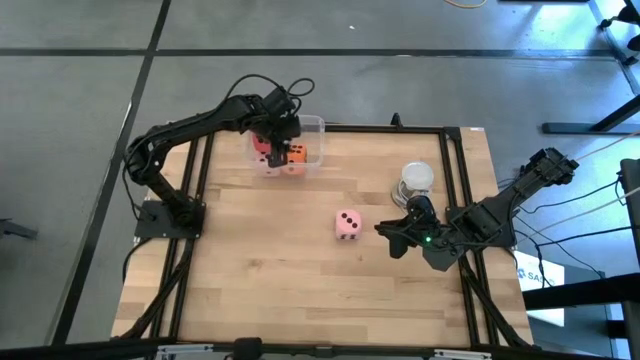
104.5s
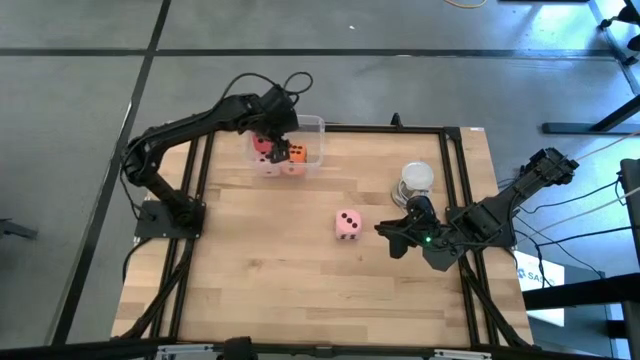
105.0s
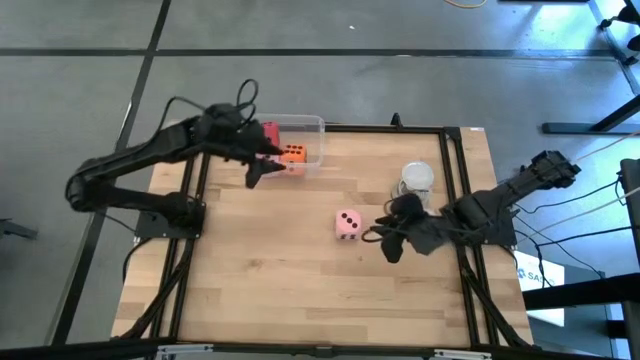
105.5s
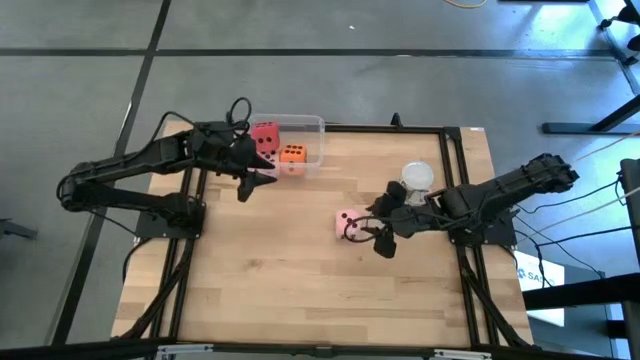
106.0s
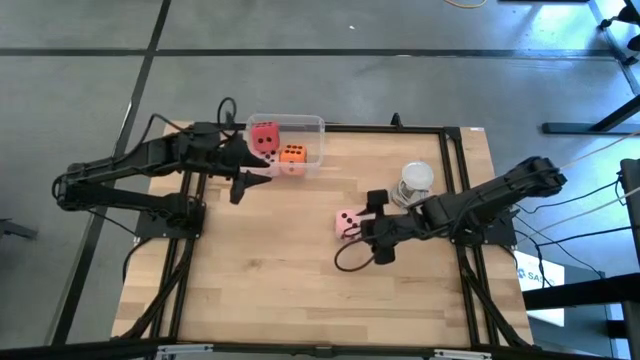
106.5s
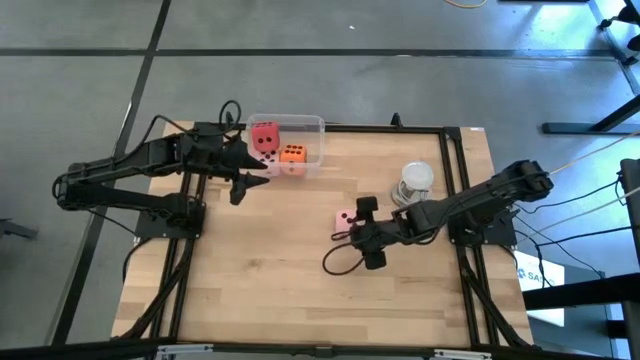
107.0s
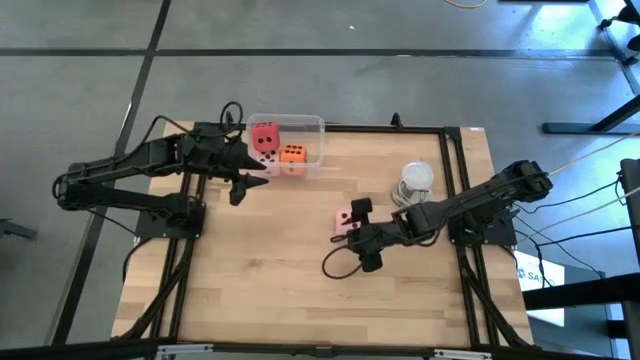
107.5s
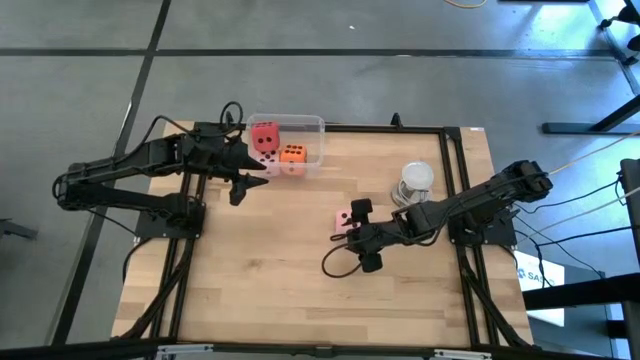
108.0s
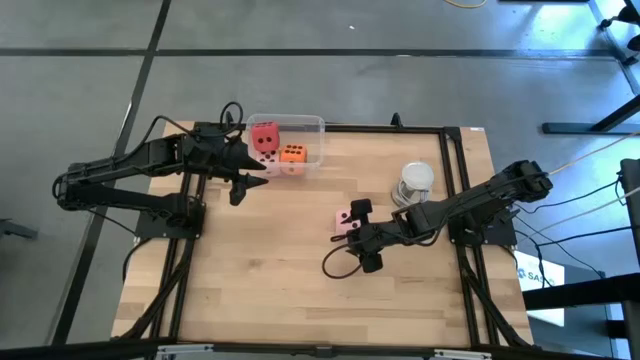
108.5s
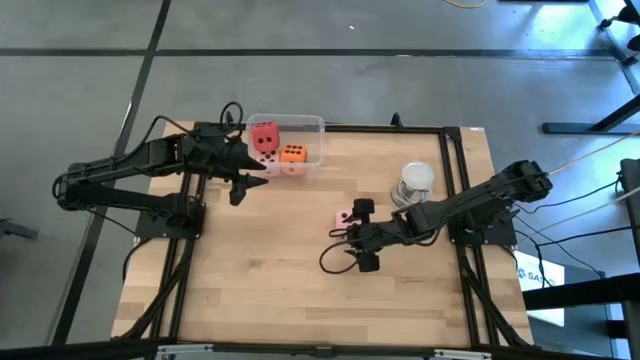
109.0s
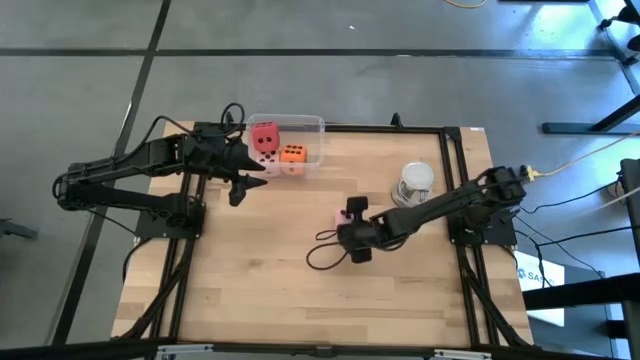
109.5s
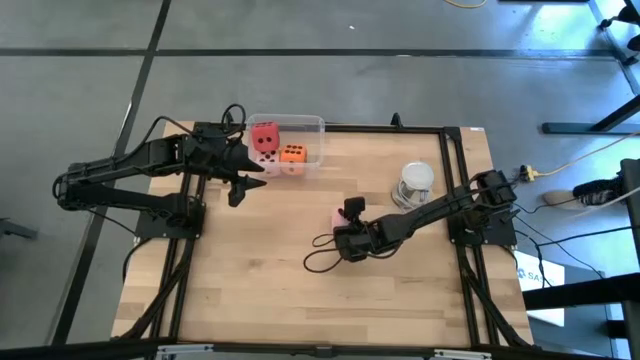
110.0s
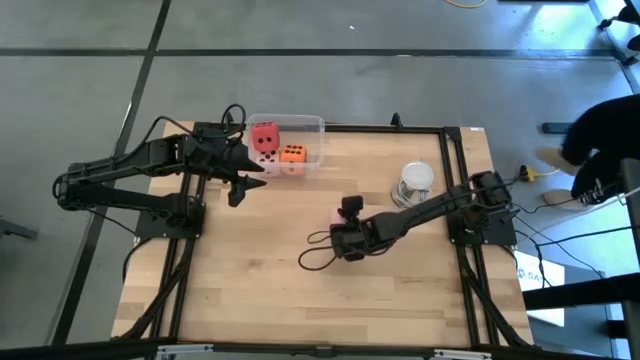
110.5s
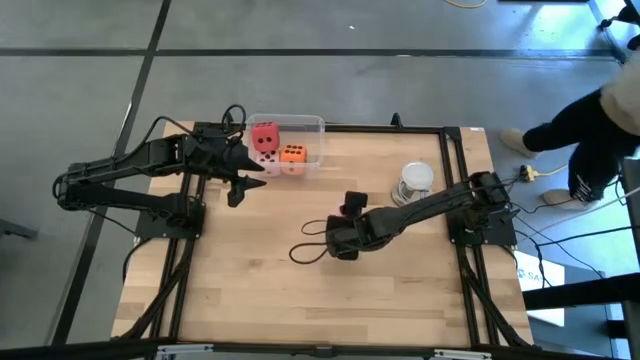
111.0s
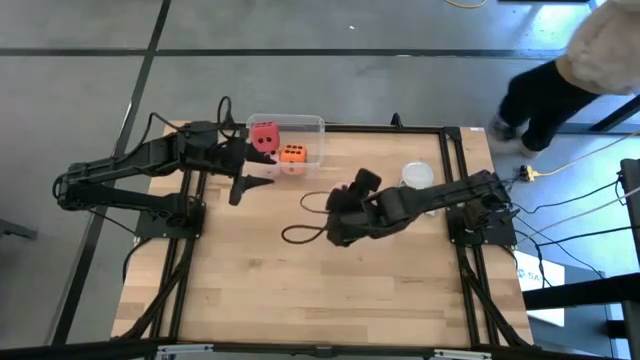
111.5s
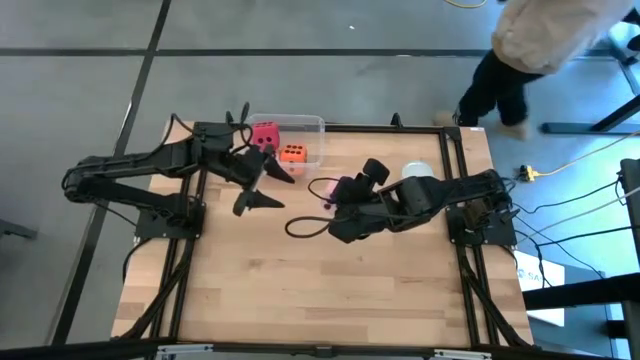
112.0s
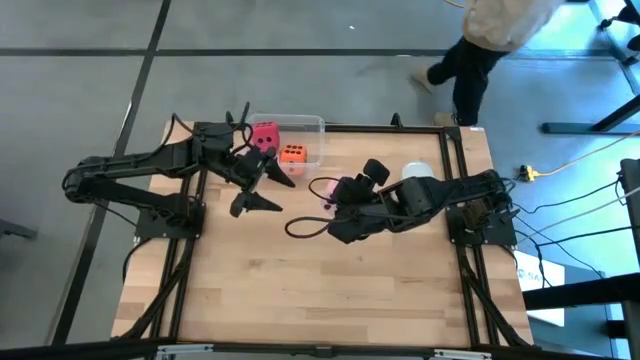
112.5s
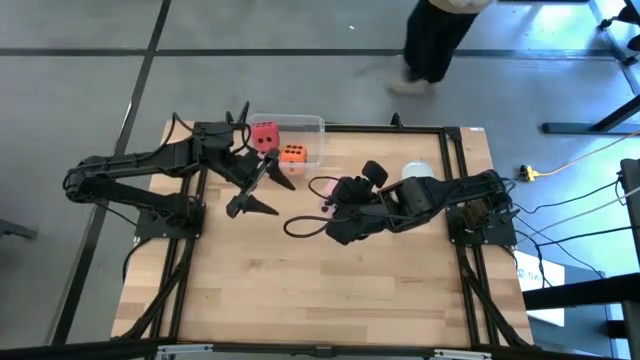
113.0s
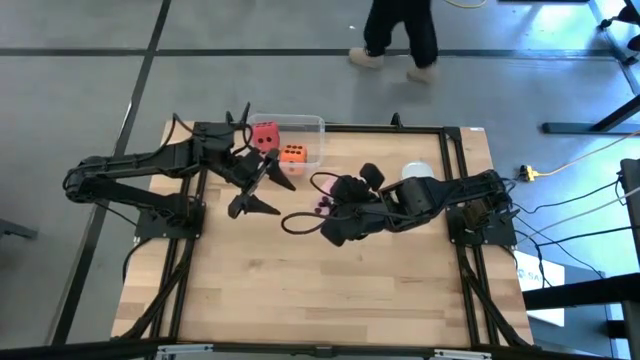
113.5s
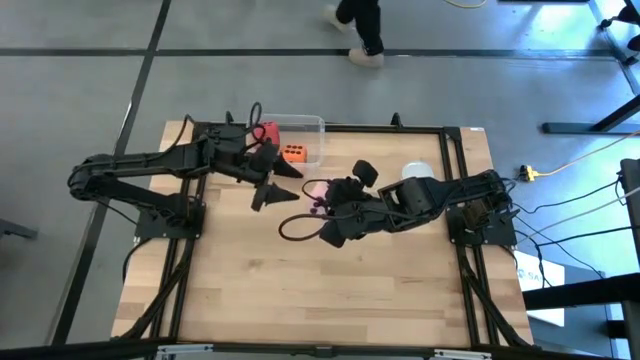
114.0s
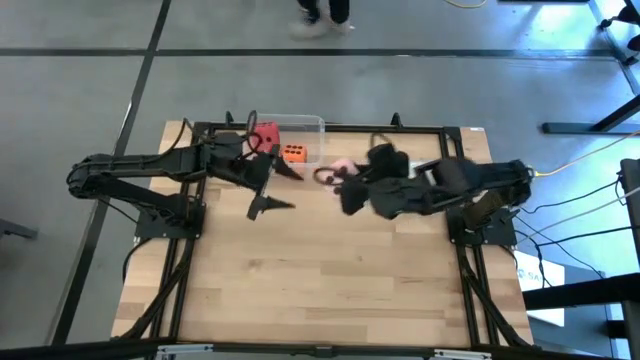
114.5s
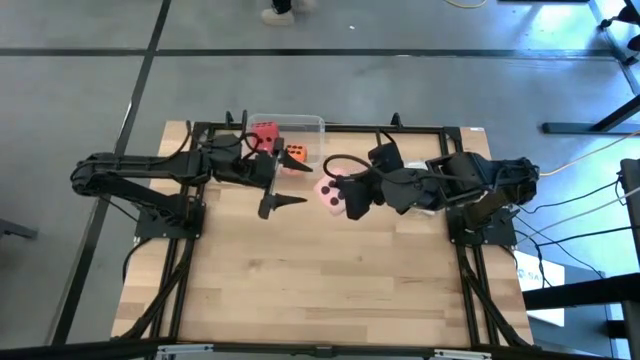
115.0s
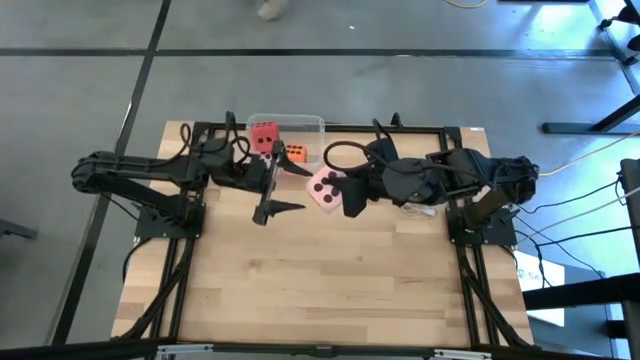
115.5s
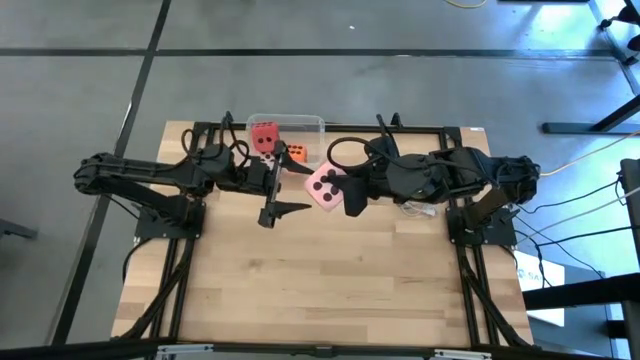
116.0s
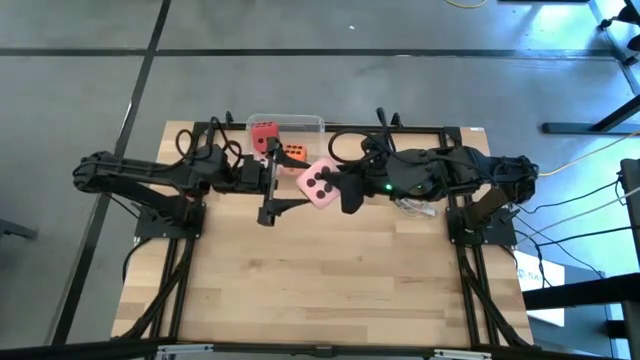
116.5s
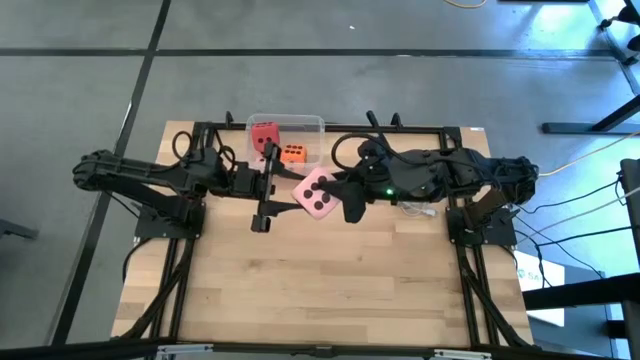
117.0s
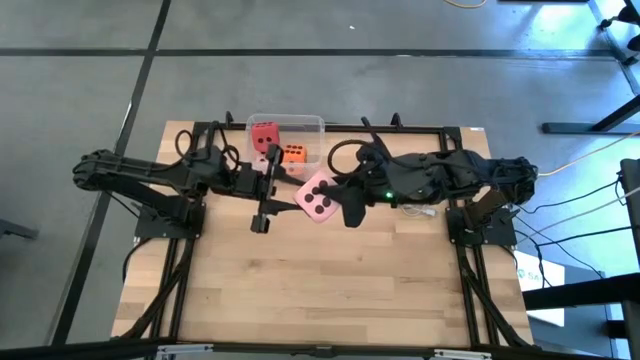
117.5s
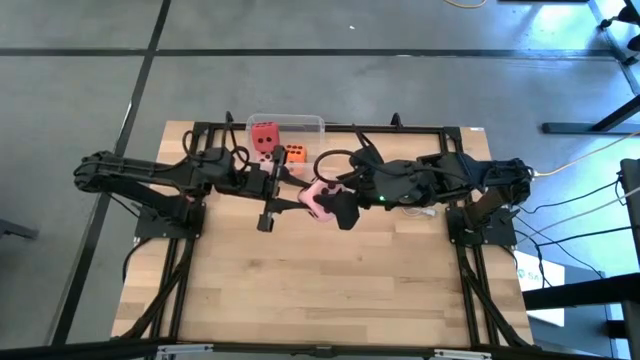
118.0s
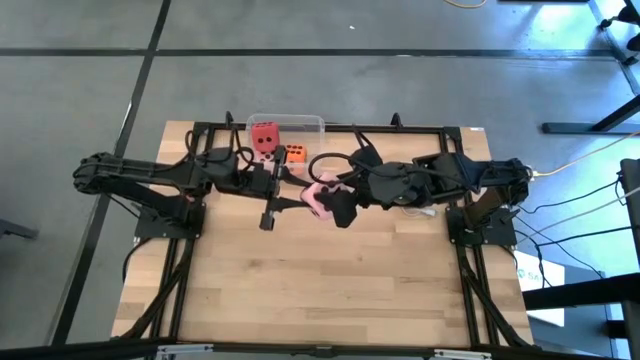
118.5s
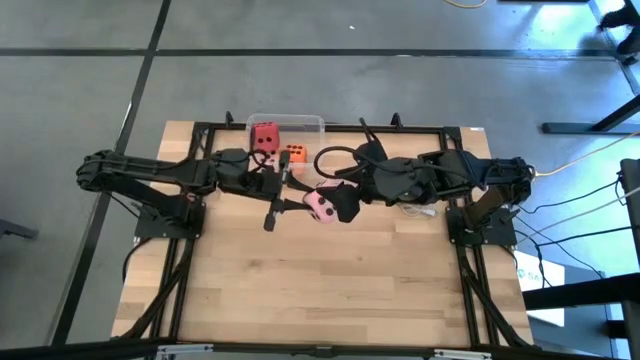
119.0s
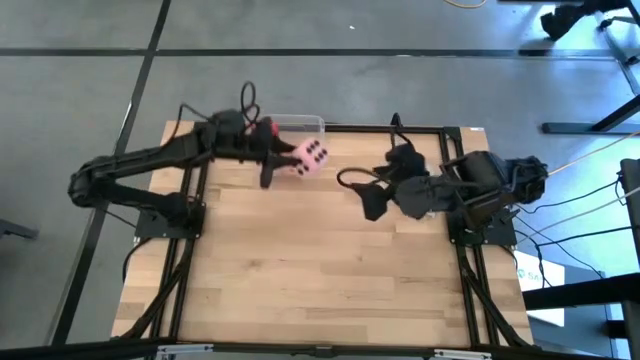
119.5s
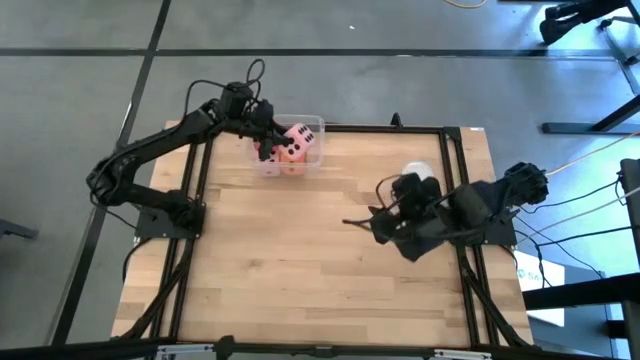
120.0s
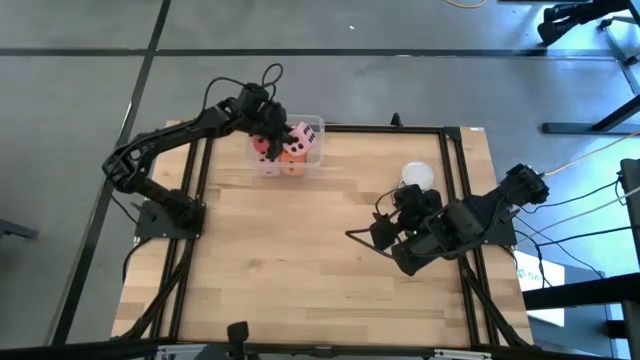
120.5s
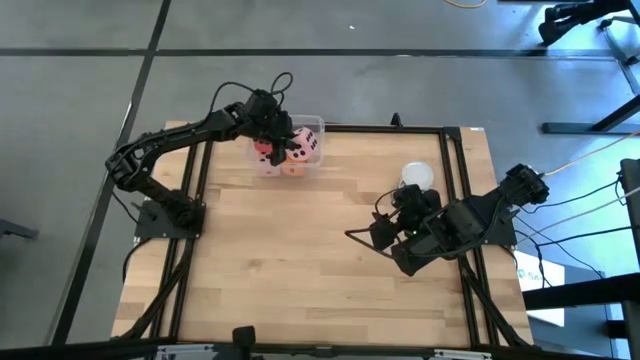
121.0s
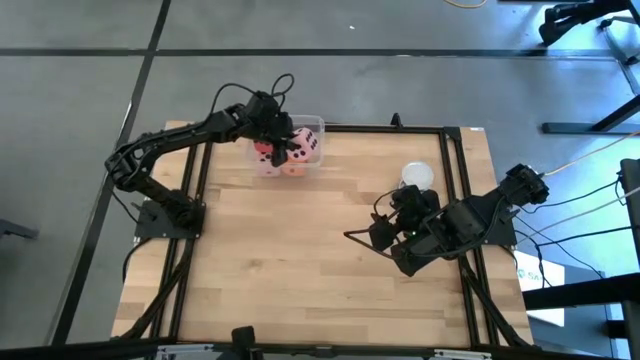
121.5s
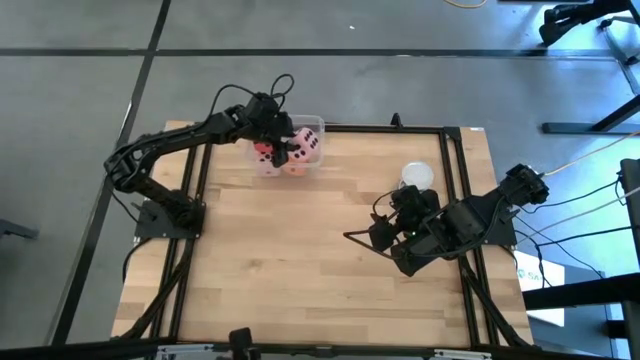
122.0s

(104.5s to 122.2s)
Task: Pick & Place Dice
Put the large pink dice into the transparent bin

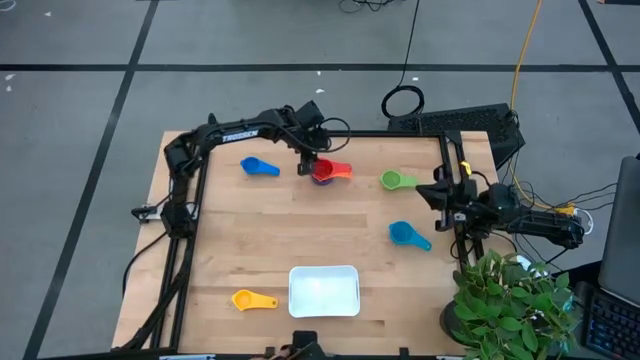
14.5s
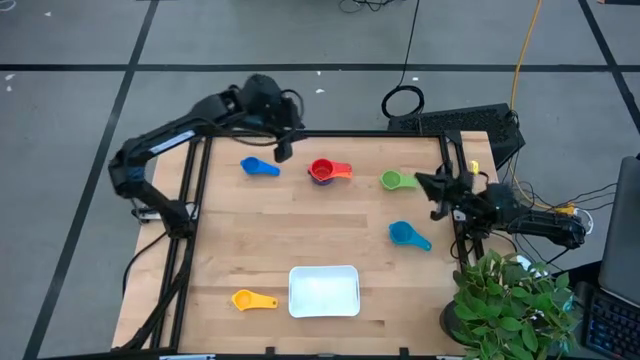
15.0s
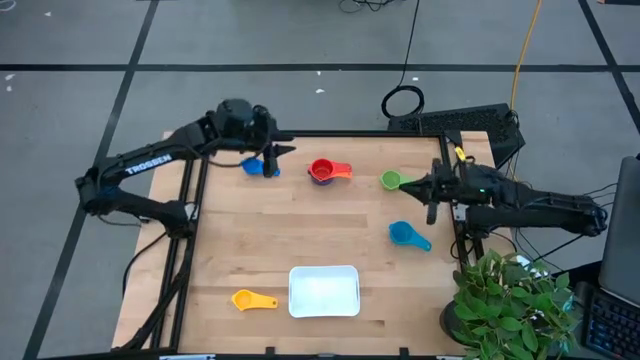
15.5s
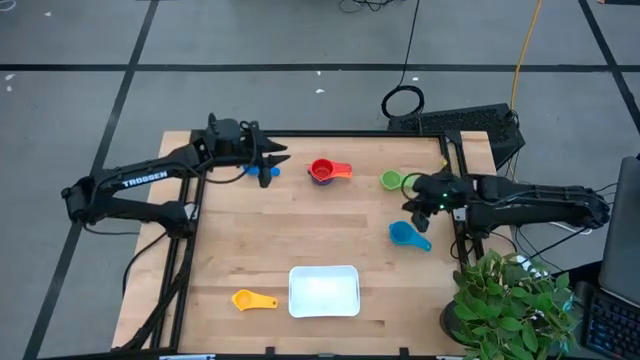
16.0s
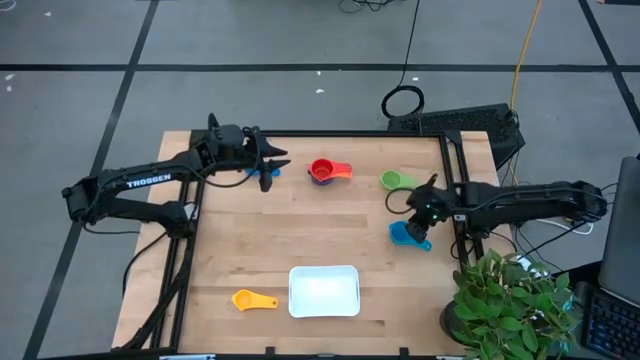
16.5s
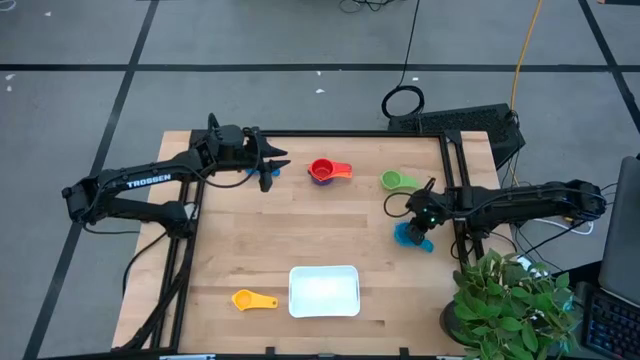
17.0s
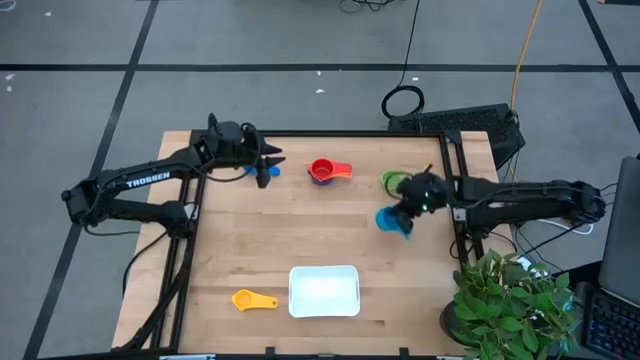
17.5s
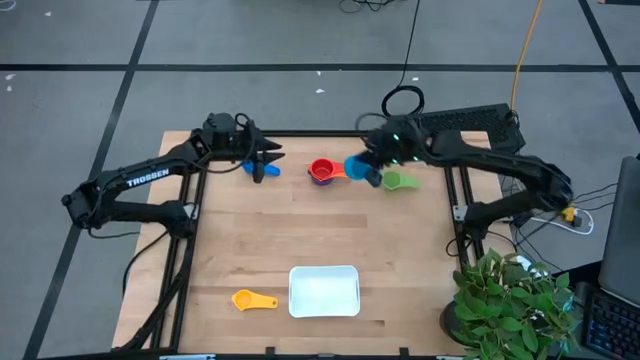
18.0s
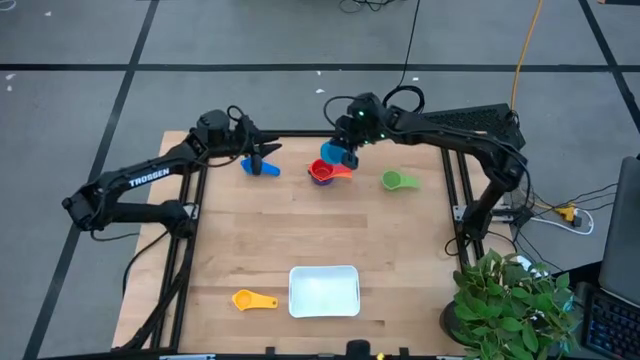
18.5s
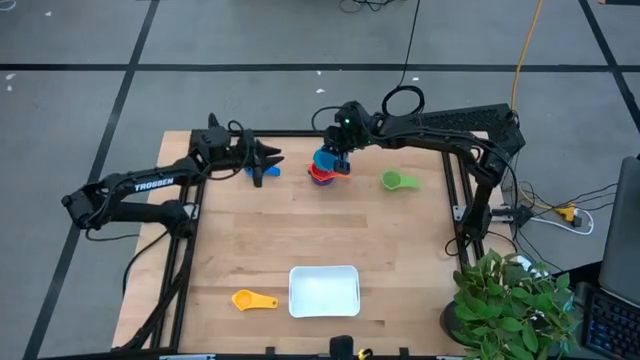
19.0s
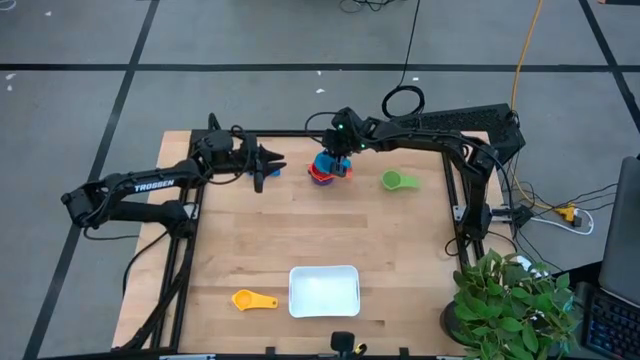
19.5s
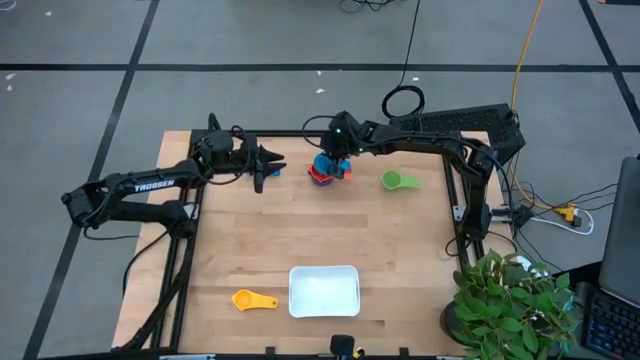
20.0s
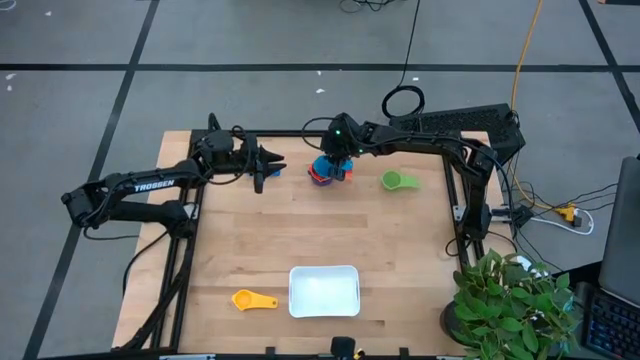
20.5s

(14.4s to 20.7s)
Task: Nest measuring cups in basket
Stack the light blue measuring cup on the red measuring cup
